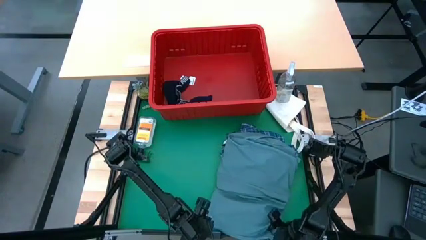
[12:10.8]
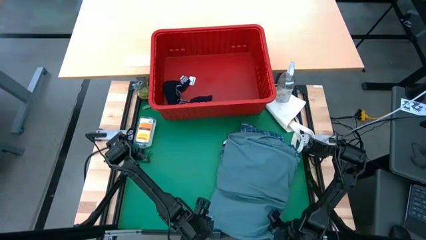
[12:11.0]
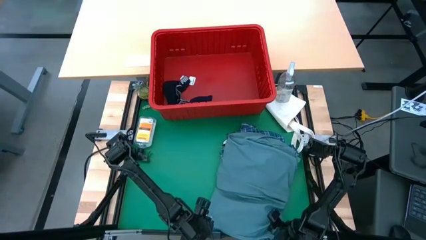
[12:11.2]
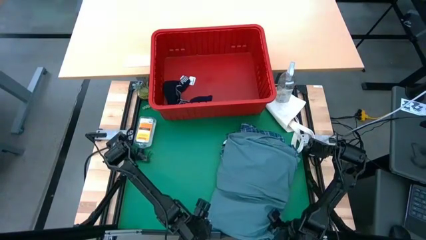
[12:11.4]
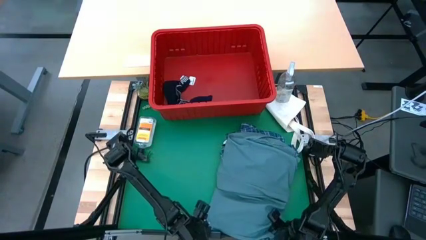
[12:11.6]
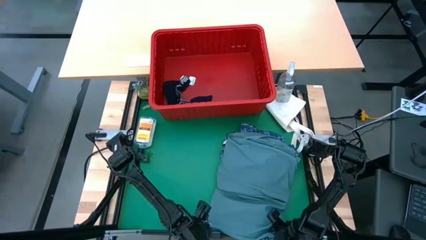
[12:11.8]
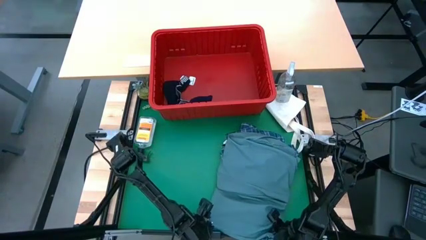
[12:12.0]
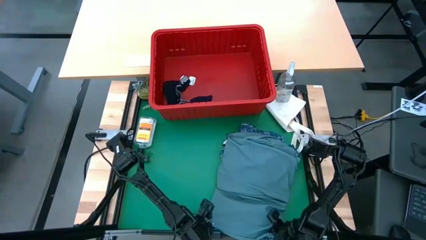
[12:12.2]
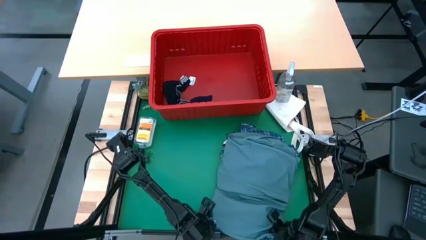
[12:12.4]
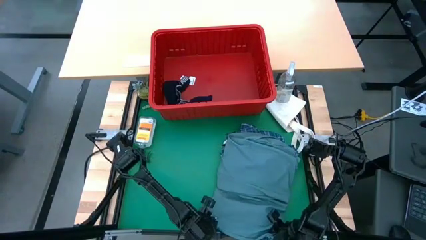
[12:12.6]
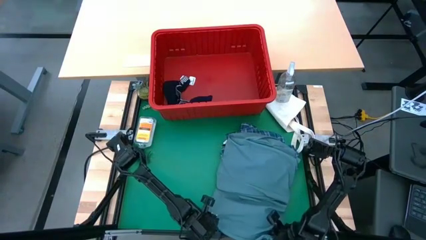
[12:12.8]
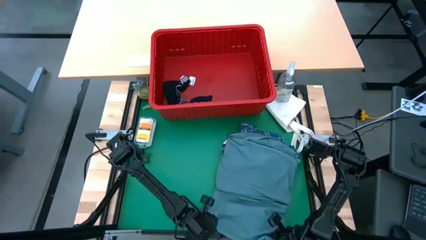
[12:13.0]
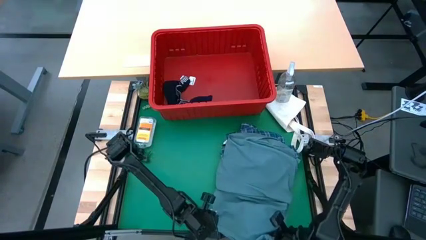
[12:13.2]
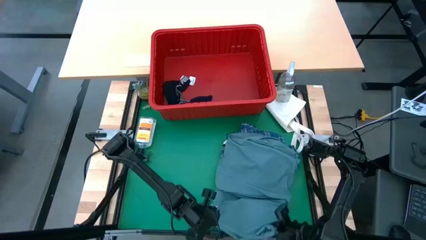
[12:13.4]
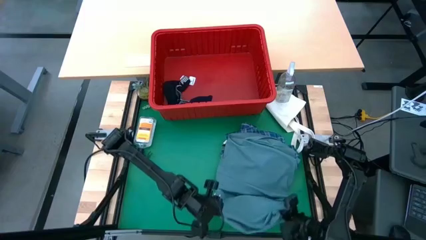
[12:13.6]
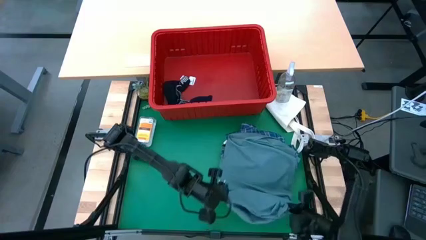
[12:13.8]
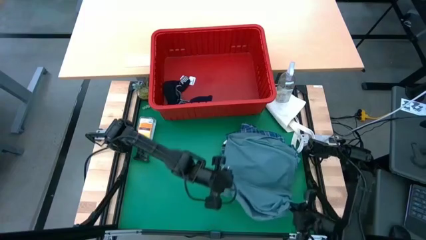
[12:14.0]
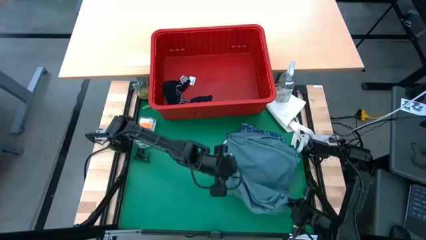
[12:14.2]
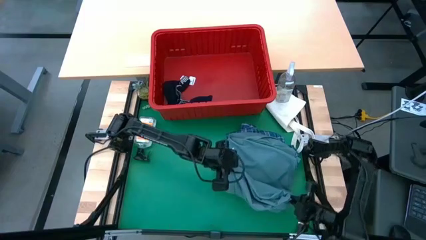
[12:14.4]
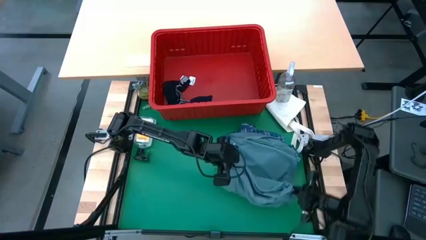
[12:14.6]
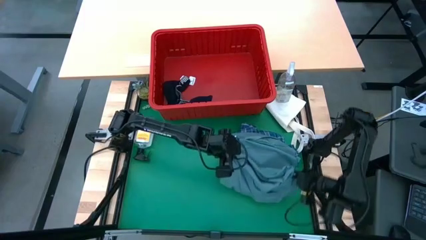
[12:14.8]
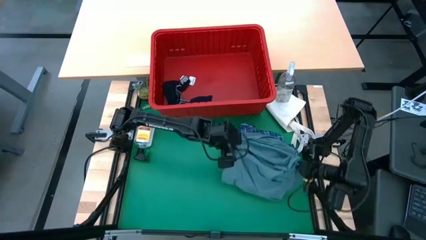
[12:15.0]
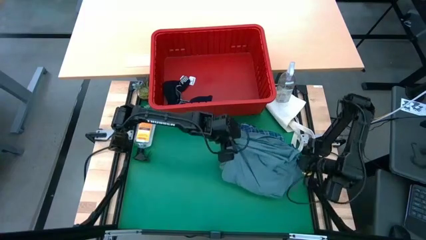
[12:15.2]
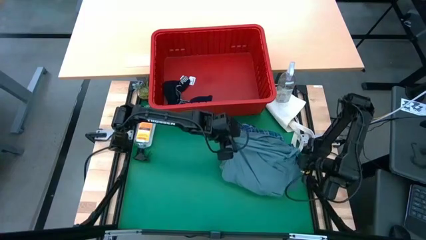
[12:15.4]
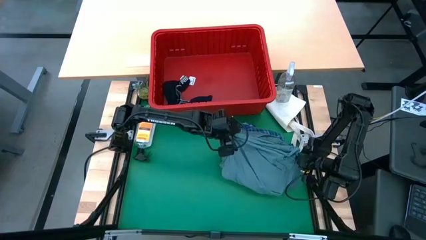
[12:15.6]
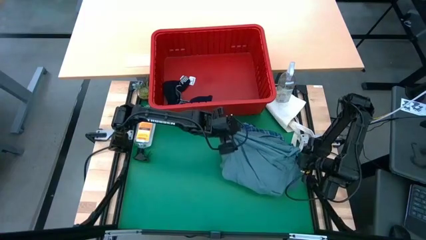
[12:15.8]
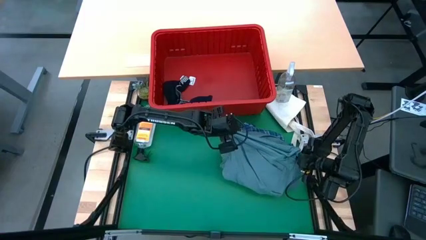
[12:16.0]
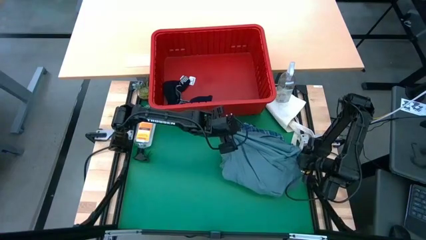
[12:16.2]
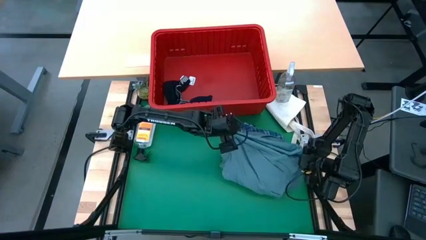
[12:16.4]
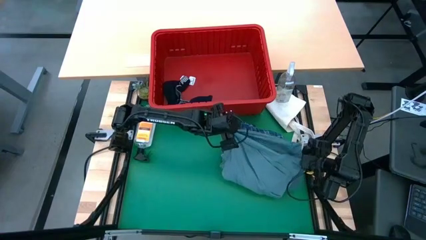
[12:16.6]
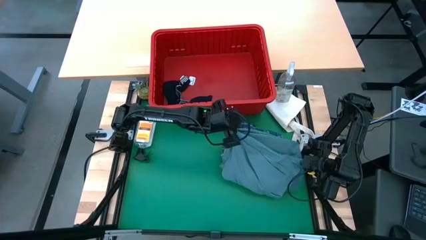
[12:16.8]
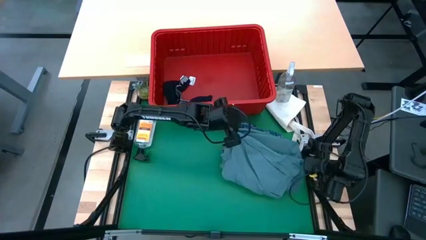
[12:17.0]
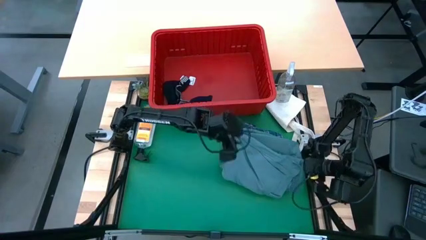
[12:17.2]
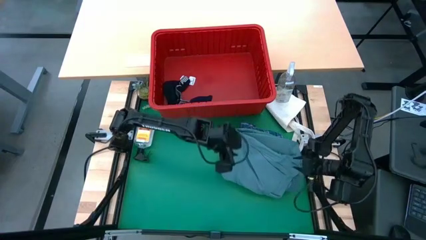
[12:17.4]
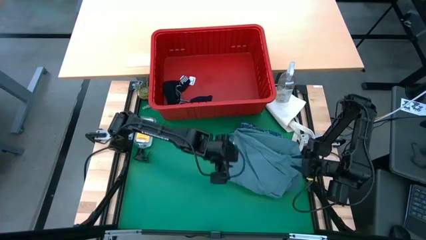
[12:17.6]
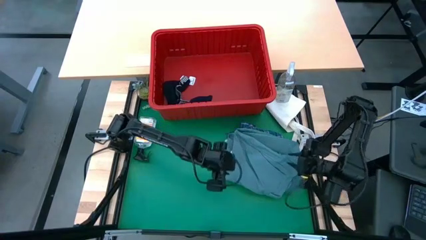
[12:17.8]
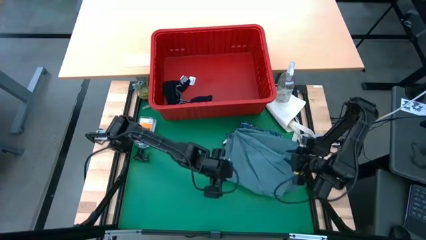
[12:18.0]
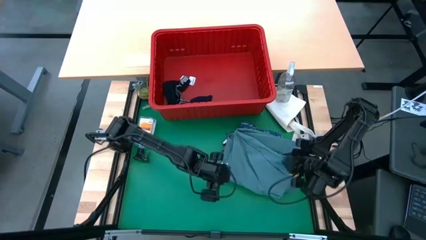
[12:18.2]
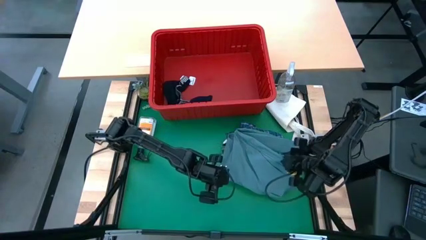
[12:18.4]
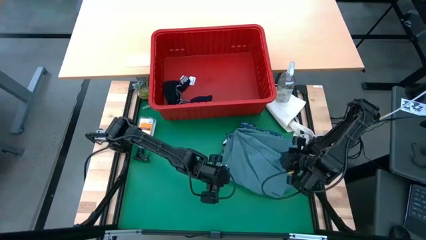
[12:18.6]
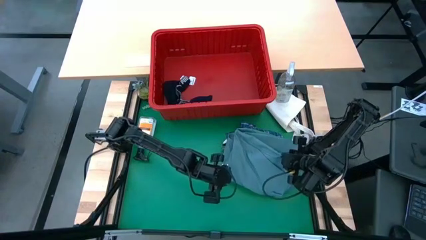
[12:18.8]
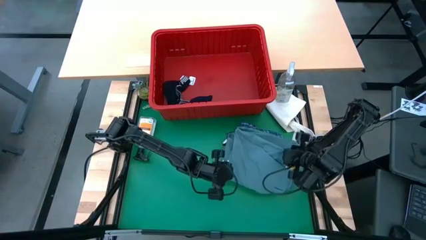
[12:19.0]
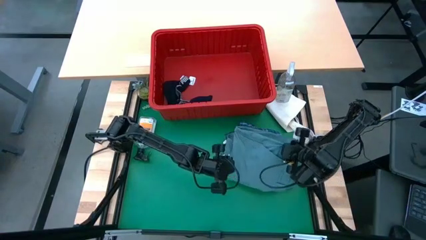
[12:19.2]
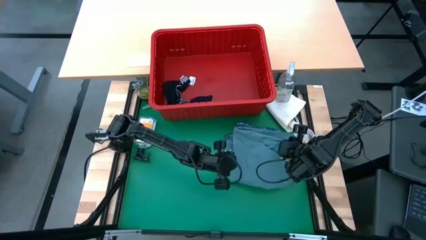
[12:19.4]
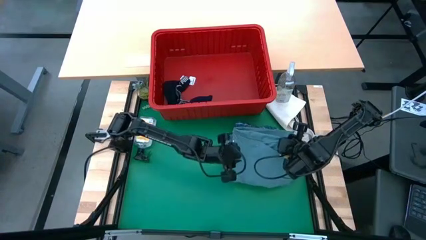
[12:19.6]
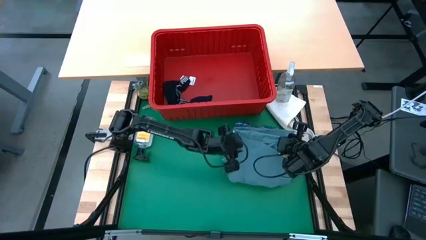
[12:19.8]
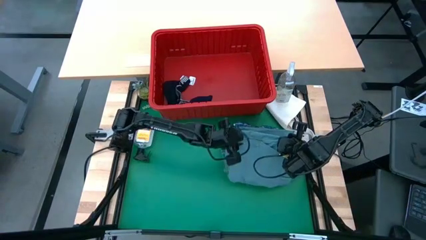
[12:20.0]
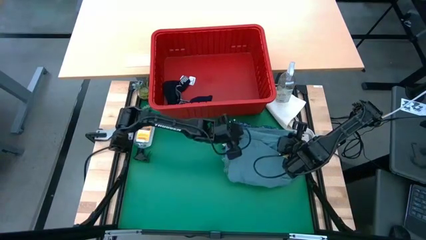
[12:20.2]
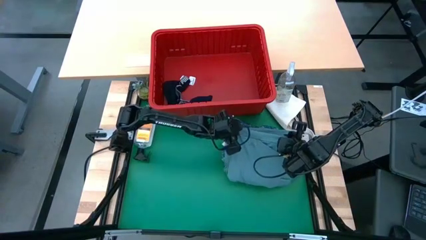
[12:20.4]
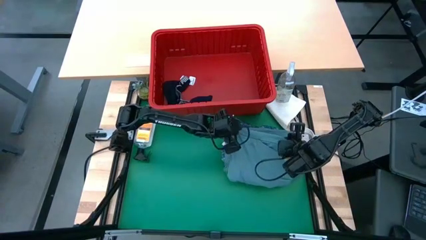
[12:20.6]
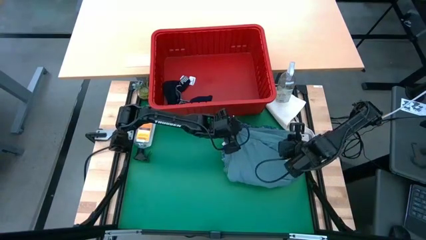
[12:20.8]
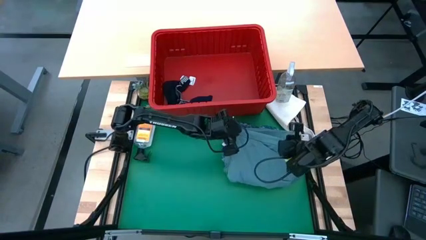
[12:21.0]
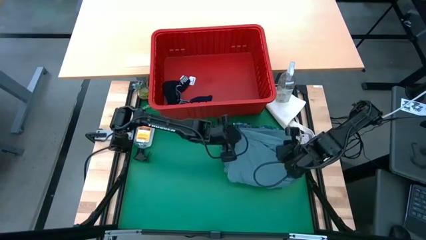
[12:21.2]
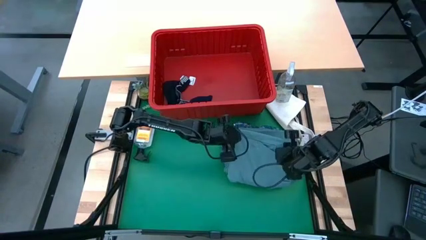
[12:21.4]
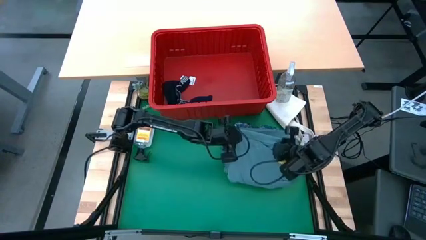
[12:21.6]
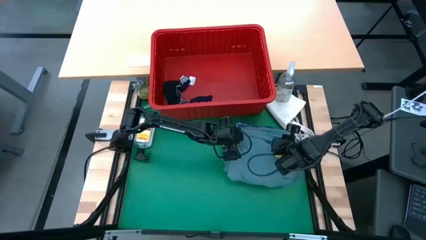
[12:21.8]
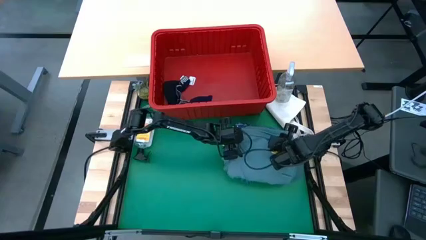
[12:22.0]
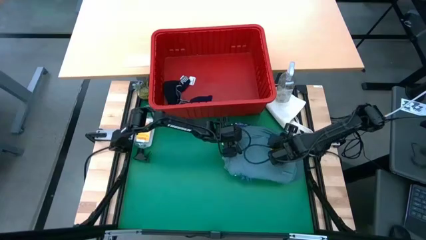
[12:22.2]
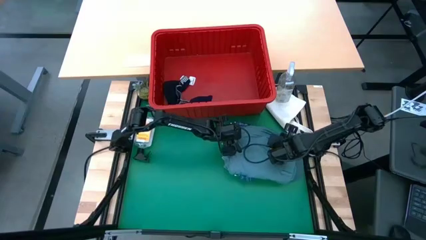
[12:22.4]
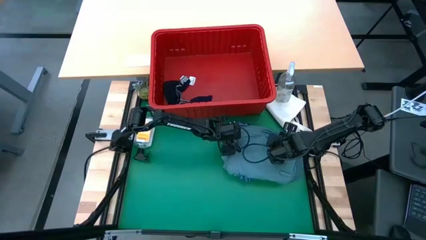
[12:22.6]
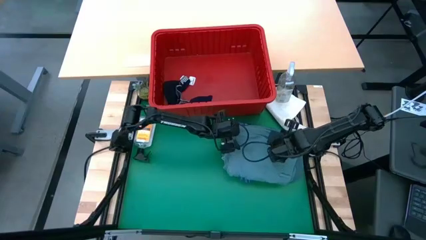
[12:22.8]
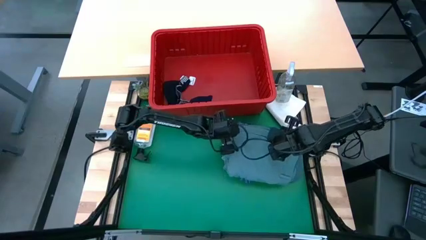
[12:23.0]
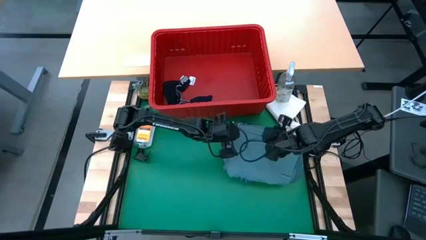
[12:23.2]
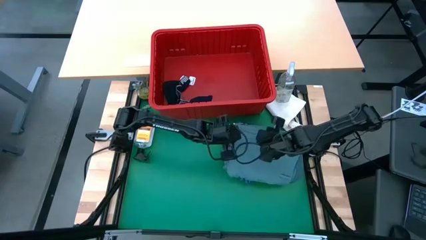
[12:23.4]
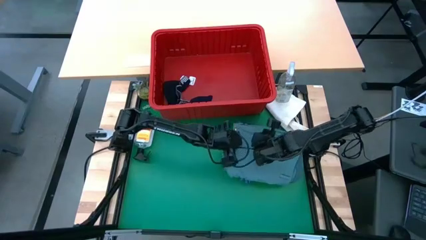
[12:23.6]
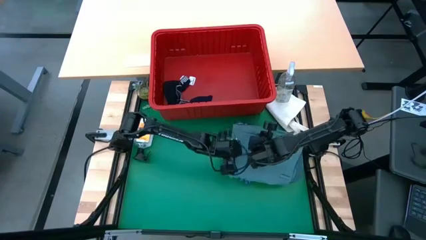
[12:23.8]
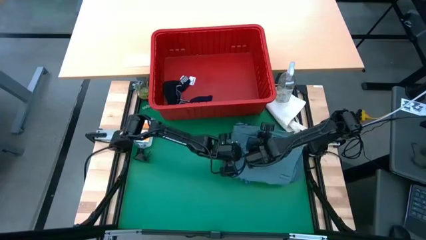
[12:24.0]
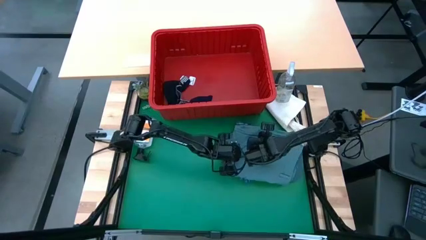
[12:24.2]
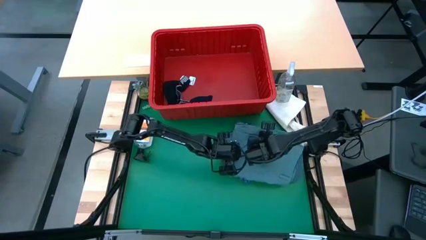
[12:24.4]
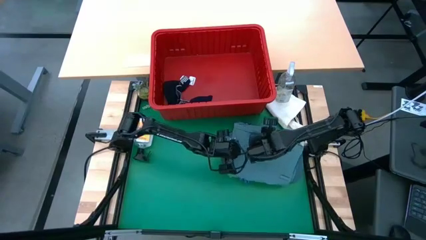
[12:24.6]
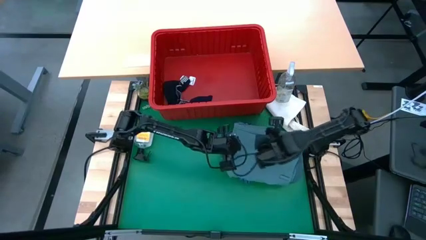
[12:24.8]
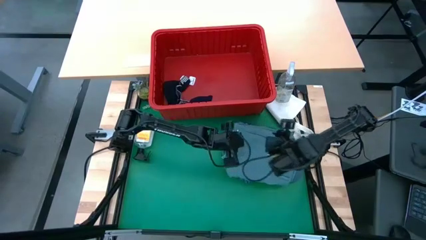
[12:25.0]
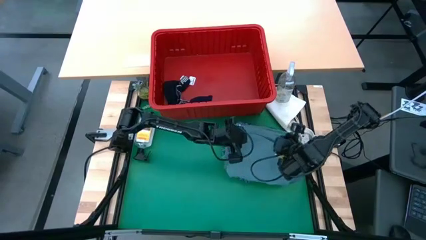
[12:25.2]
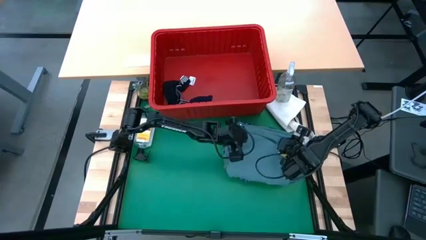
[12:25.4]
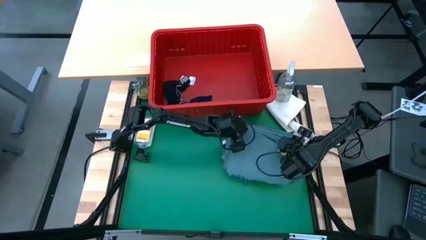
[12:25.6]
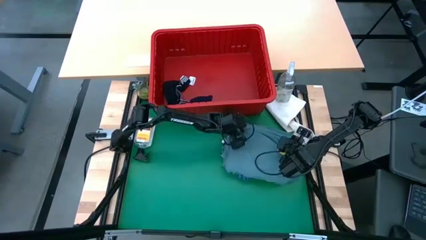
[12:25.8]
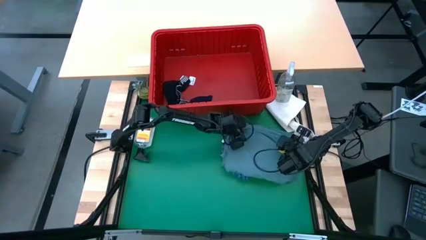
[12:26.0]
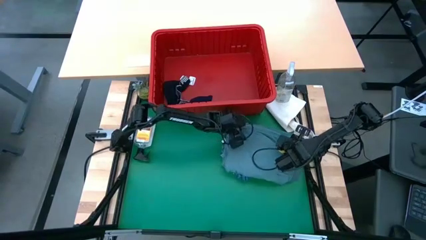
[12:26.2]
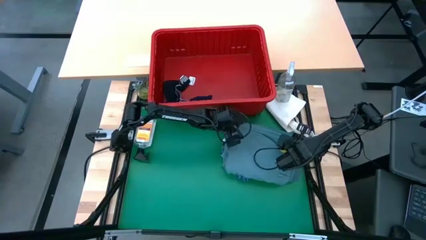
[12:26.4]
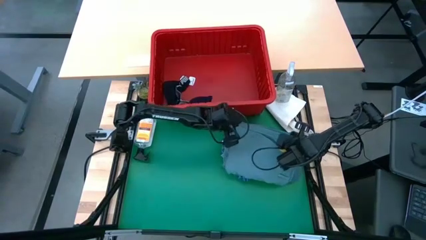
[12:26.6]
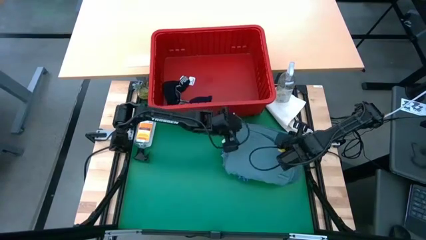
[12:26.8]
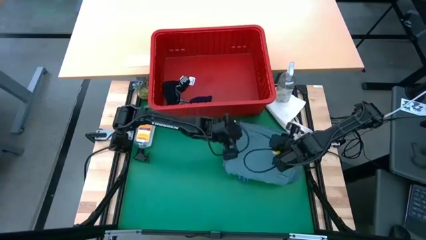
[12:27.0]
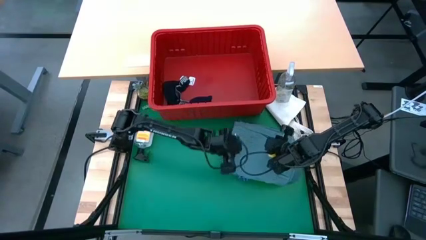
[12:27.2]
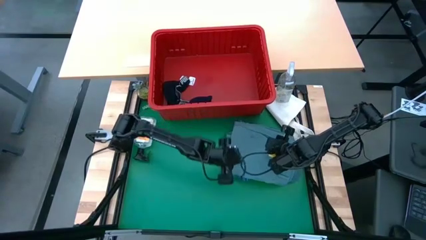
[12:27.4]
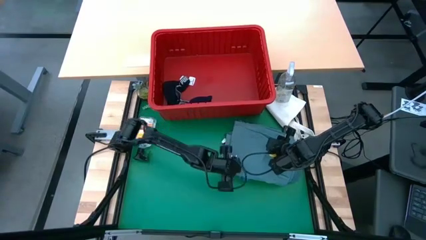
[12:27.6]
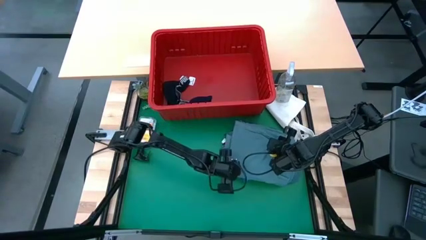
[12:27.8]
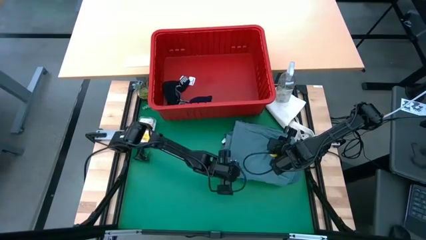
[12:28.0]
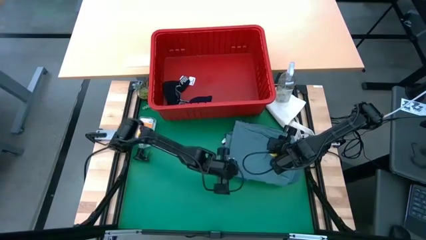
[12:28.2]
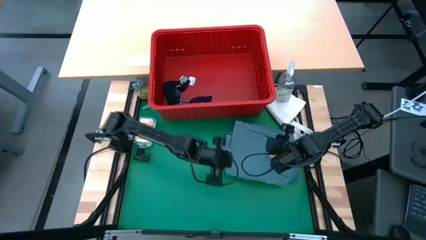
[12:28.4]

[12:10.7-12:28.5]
Task: Fold Laundry from Bin
Fold the blue pants on top of the blue shirt
